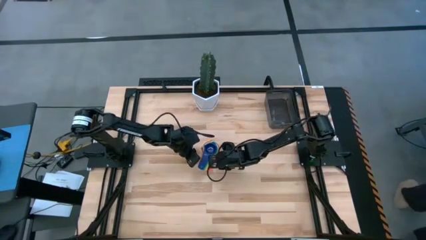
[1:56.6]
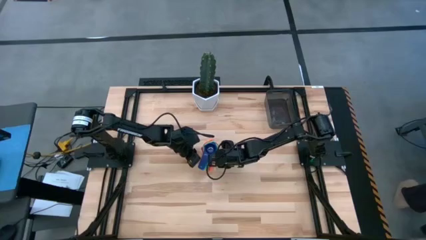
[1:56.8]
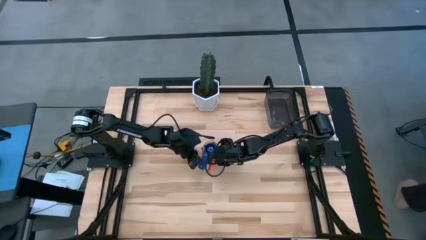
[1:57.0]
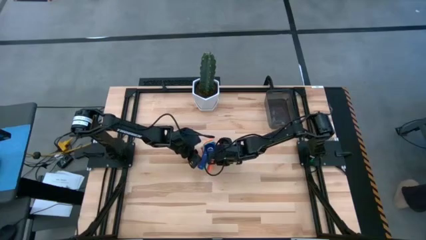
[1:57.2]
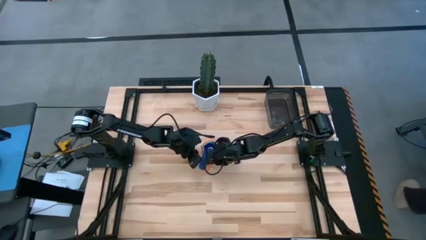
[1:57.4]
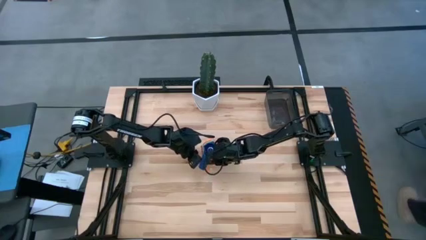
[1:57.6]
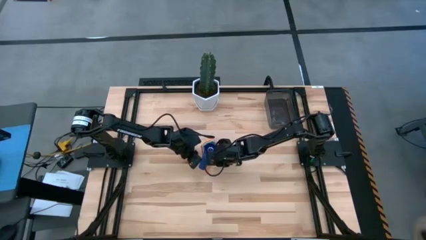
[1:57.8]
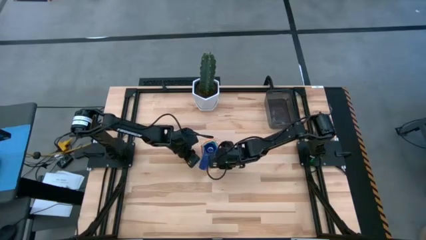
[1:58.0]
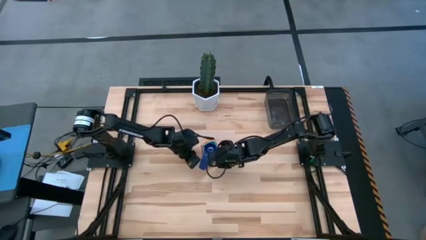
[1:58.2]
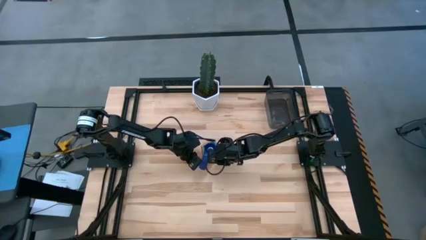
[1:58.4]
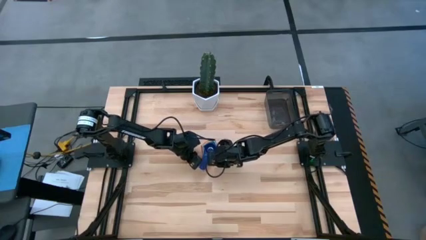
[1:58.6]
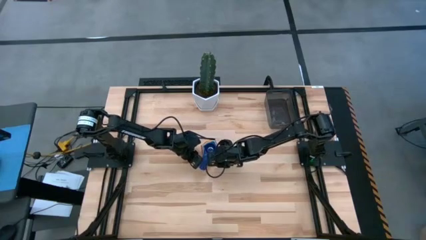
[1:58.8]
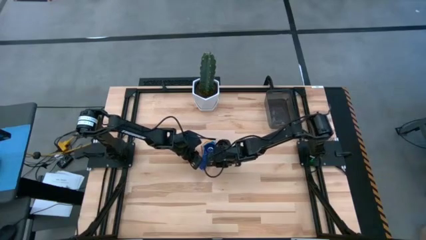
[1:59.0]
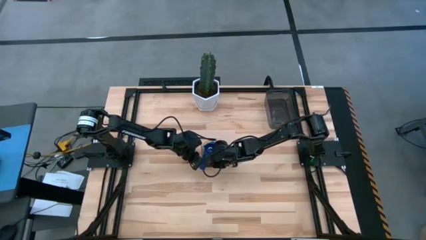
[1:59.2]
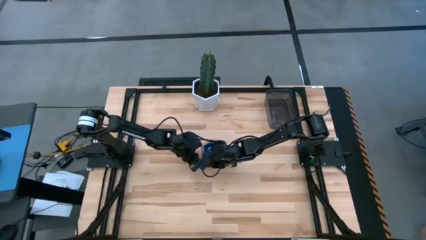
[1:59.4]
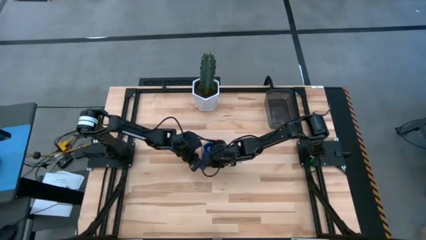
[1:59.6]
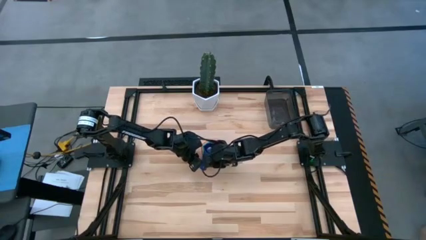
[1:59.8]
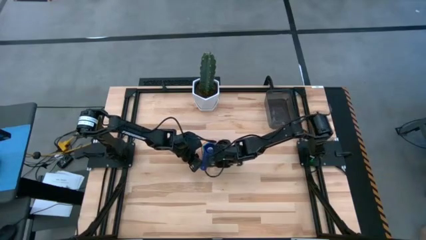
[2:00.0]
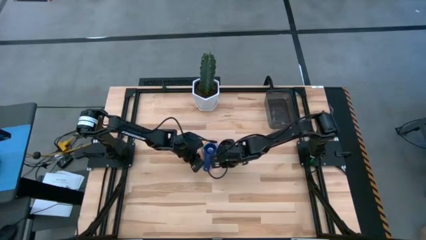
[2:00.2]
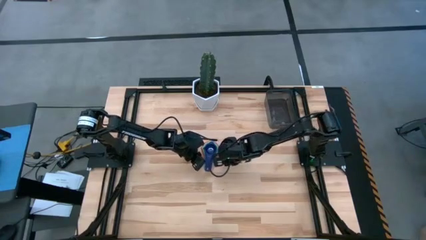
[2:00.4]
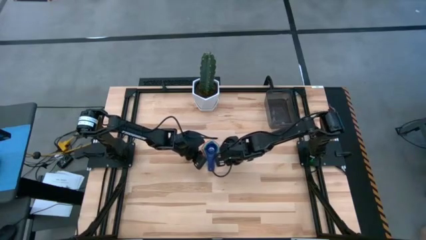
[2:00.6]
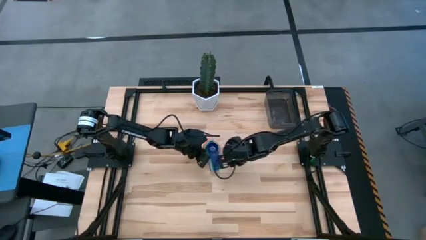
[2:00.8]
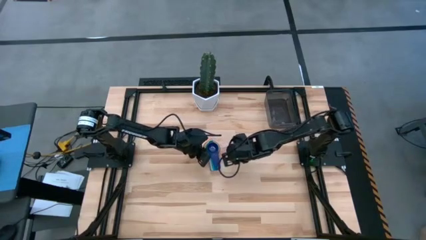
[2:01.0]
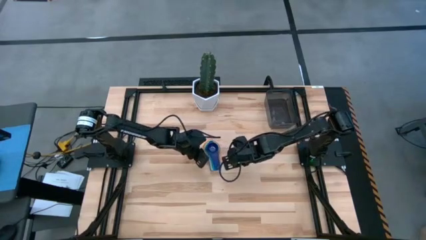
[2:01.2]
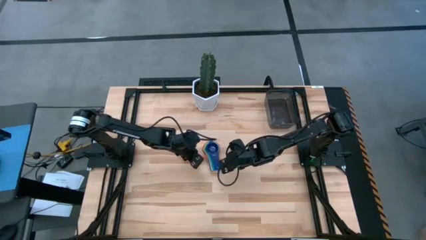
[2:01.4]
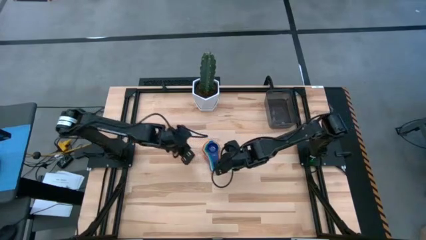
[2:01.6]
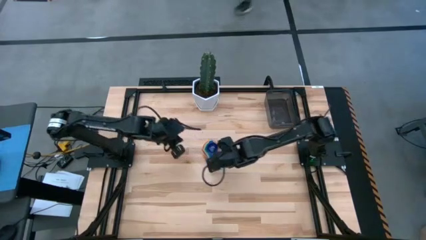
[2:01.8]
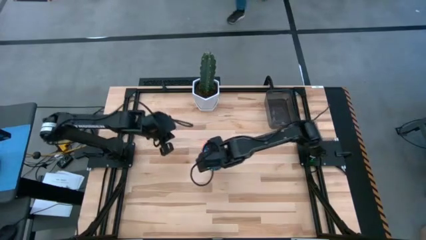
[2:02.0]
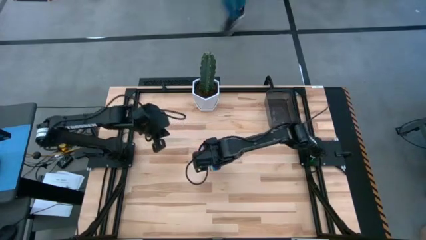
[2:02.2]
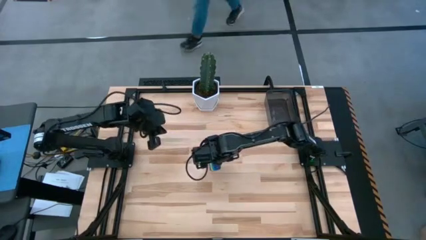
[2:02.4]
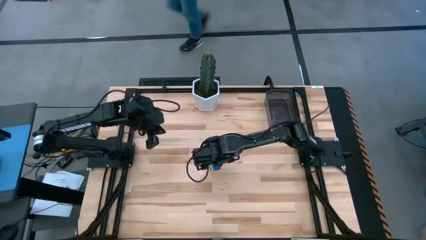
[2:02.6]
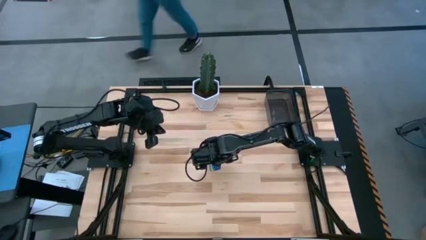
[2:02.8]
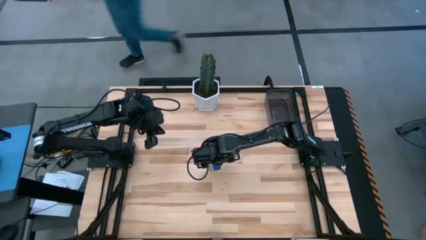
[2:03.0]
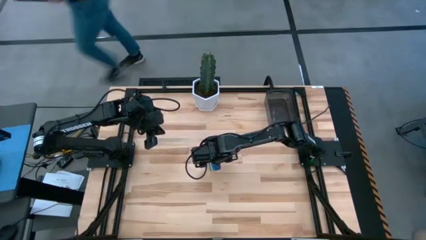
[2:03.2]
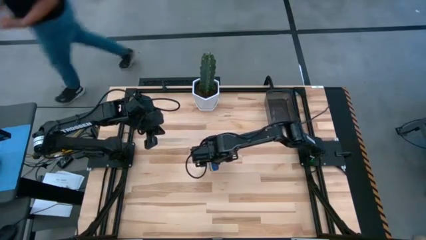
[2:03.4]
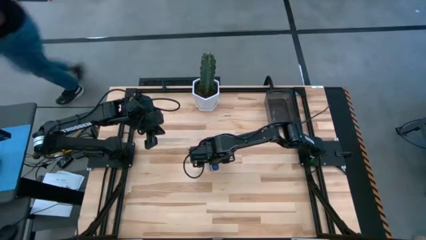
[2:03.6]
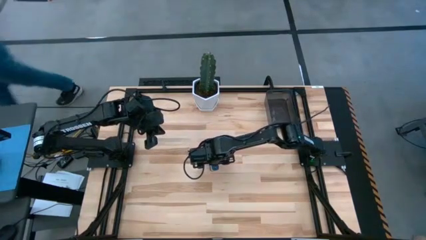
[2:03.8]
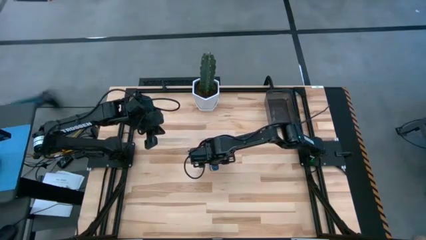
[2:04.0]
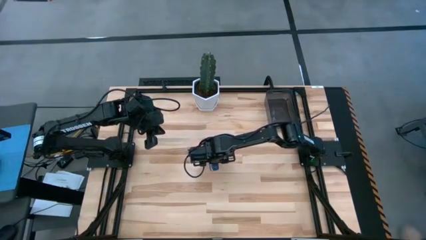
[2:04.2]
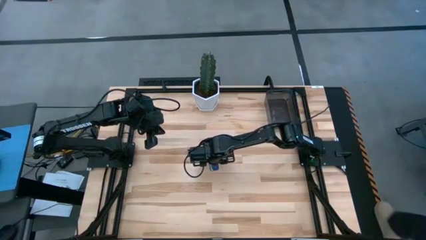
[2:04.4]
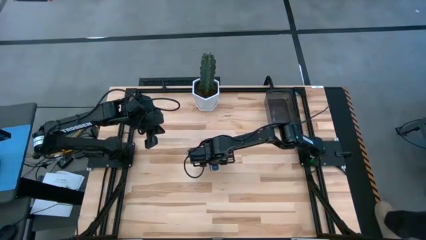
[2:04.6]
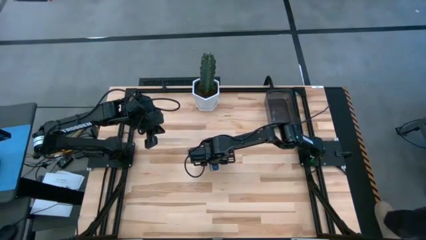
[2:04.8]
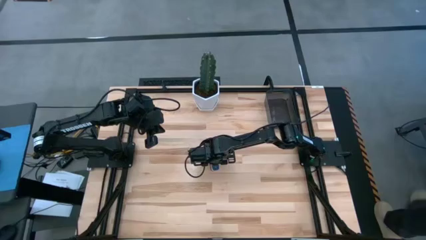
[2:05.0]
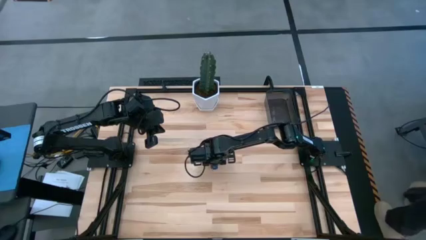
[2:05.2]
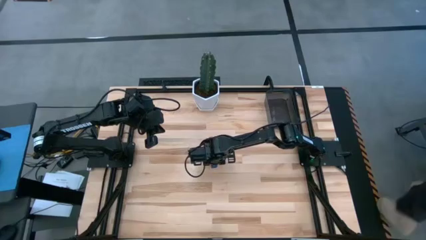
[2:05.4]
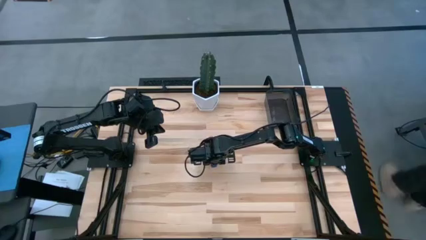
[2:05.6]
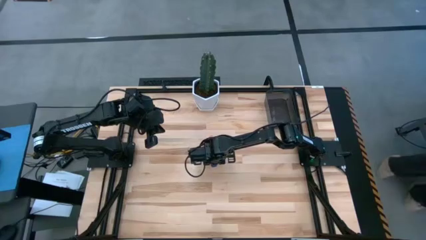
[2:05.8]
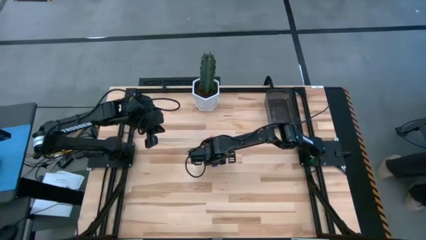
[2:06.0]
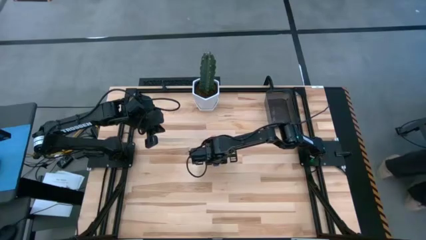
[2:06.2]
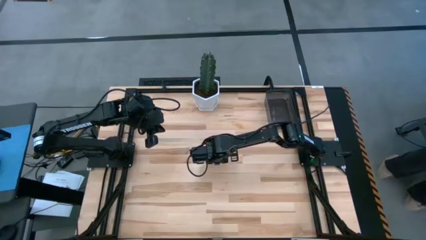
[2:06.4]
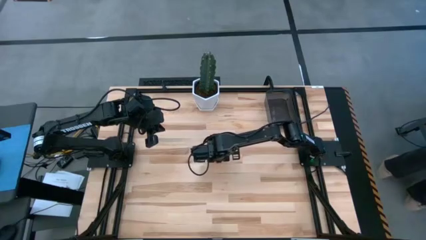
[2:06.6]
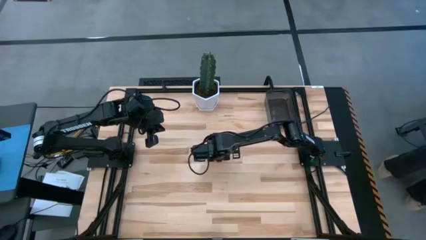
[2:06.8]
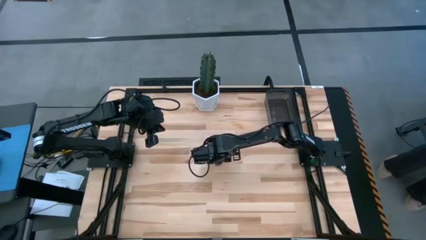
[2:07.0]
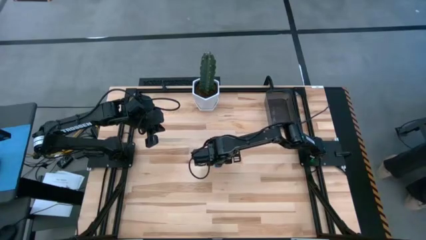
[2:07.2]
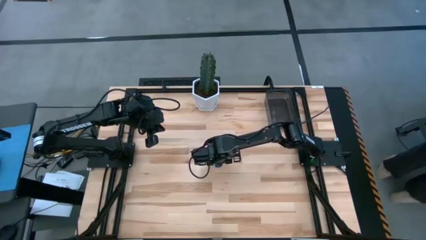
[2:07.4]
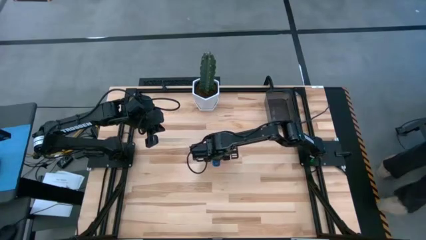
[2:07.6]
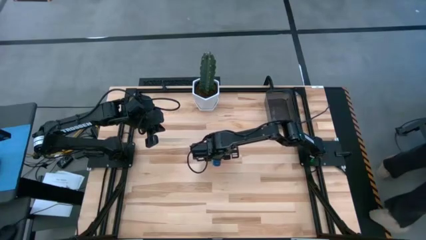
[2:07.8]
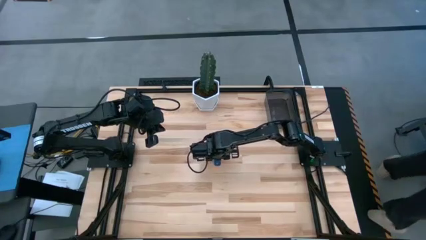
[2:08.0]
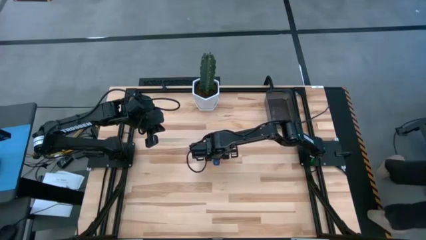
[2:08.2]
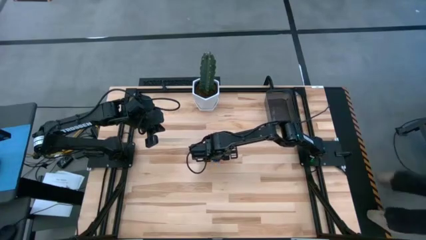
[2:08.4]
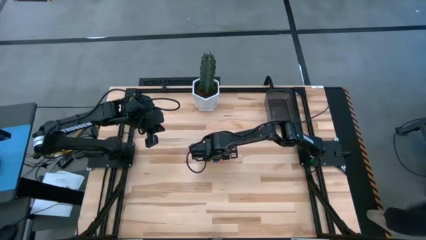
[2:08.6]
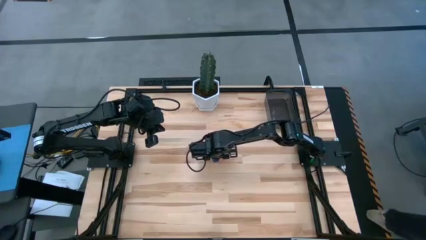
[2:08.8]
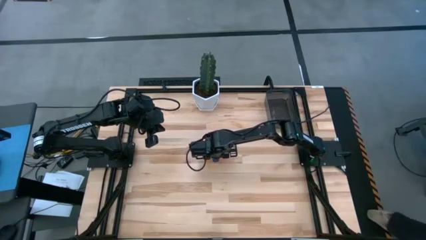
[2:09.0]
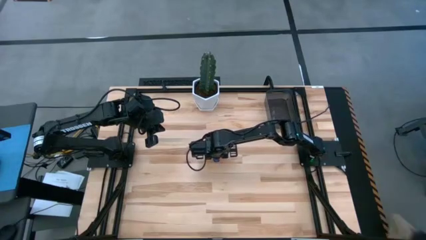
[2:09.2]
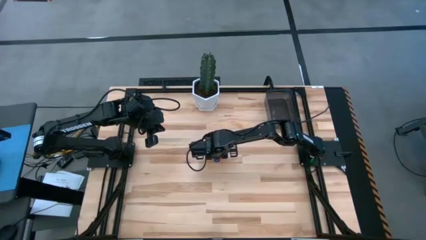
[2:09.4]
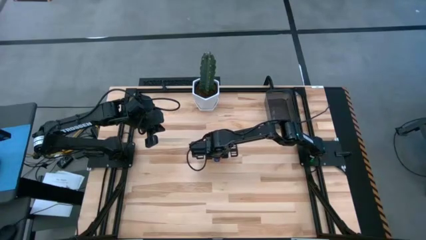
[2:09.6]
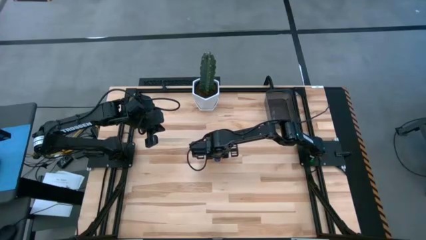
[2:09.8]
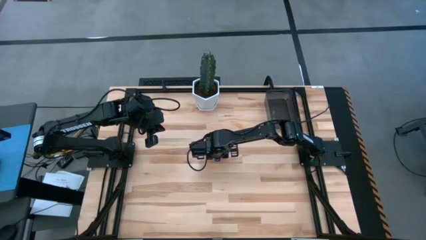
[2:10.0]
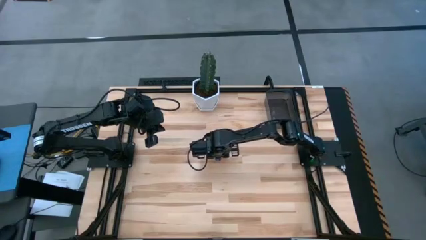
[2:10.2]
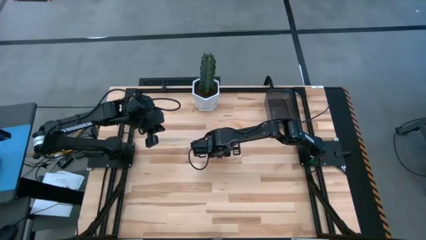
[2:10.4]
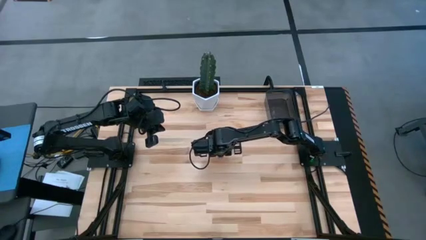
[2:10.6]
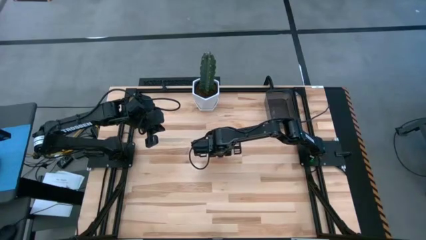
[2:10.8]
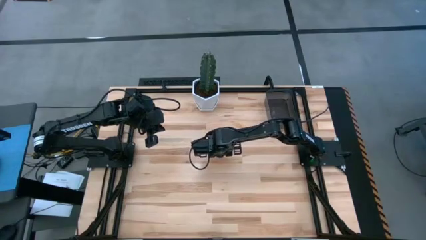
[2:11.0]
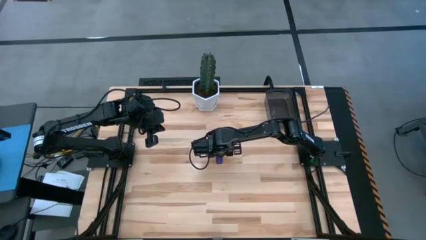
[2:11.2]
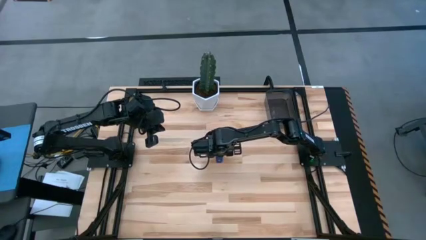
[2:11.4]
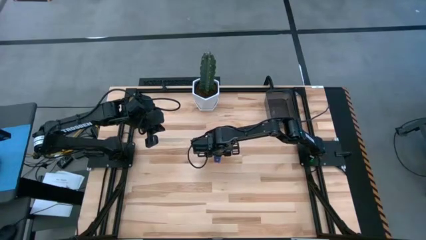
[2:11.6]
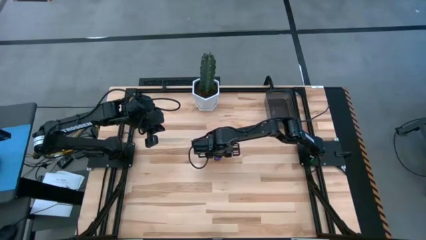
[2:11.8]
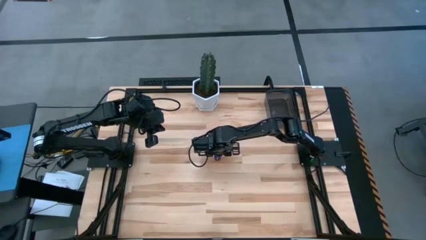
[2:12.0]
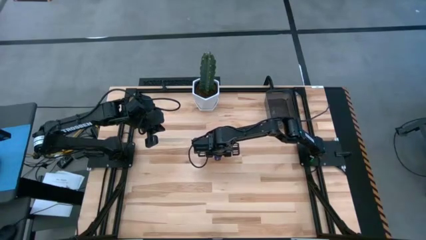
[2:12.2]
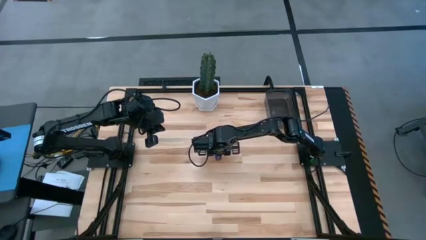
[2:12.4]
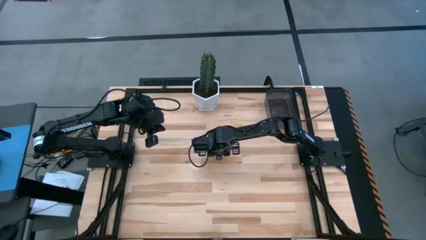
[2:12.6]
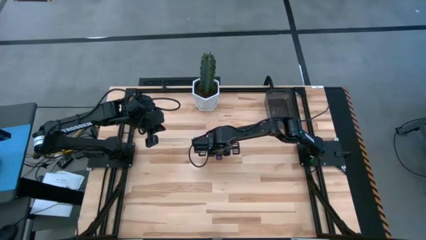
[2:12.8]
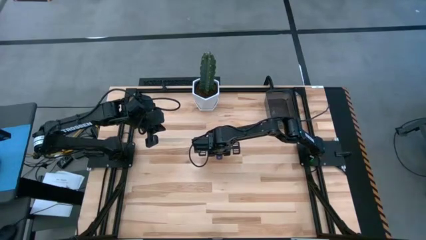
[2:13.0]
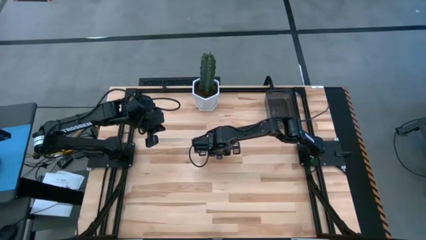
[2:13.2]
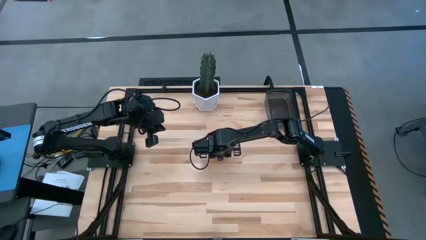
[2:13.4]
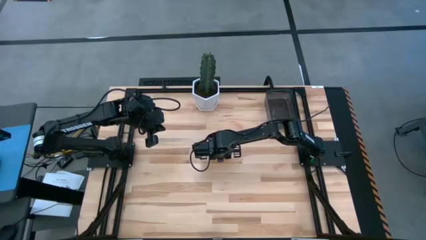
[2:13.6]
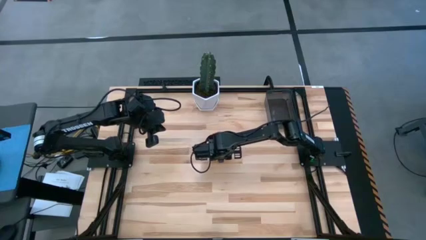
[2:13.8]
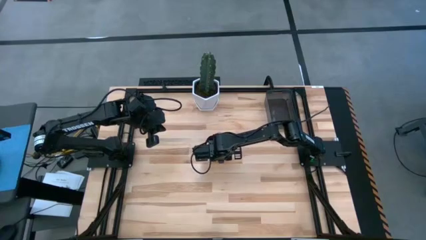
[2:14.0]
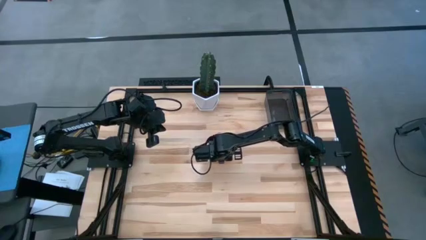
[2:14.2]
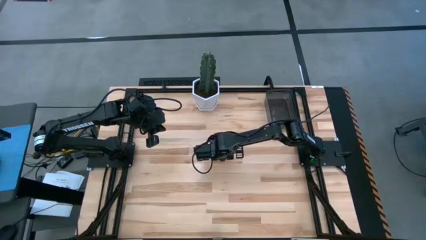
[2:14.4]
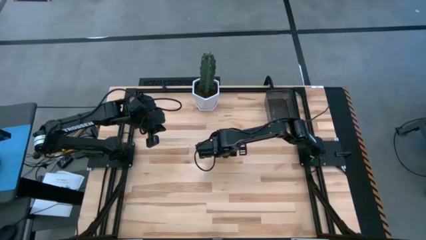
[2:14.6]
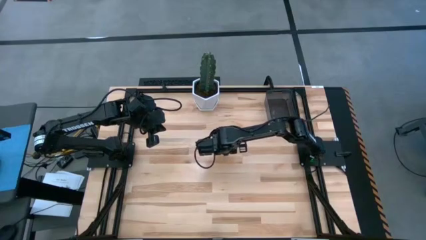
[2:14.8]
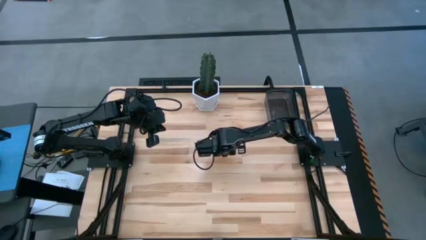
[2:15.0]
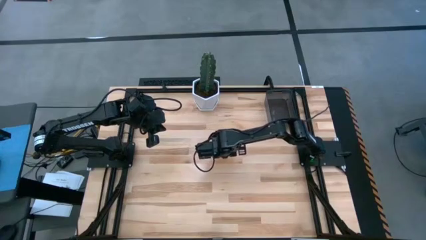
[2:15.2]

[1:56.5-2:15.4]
Task: Nest measuring cups in basket
Put the stacked measuring cups into the black bin
